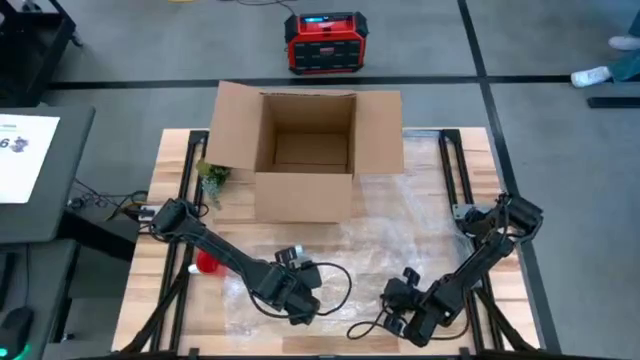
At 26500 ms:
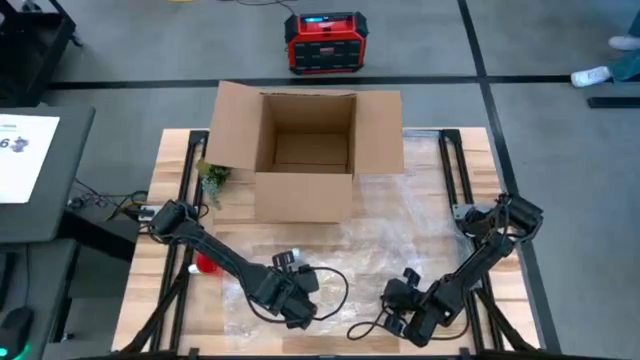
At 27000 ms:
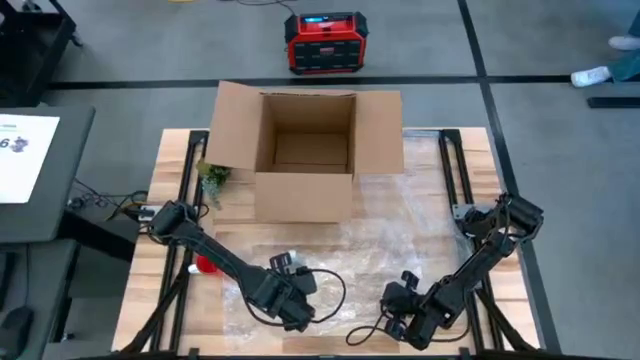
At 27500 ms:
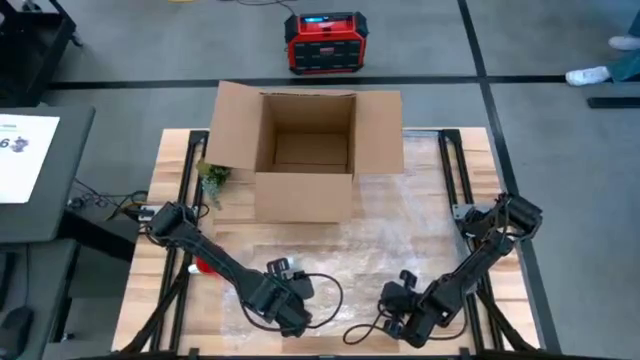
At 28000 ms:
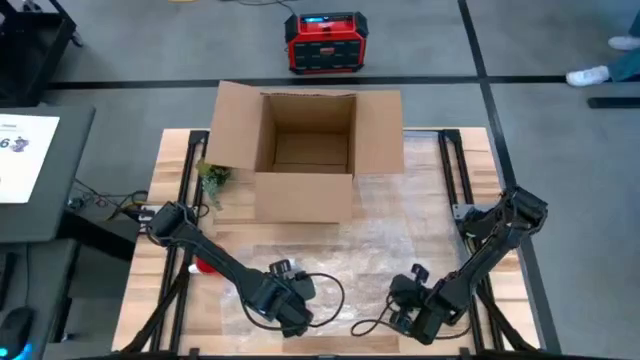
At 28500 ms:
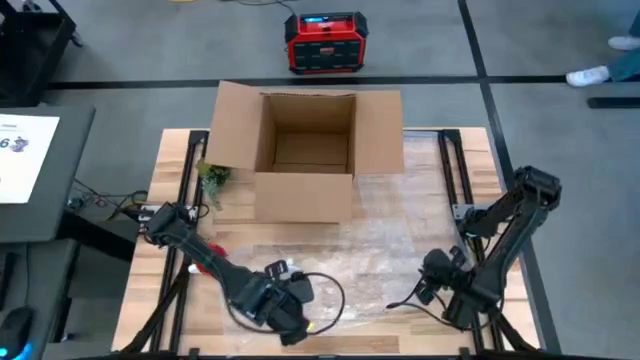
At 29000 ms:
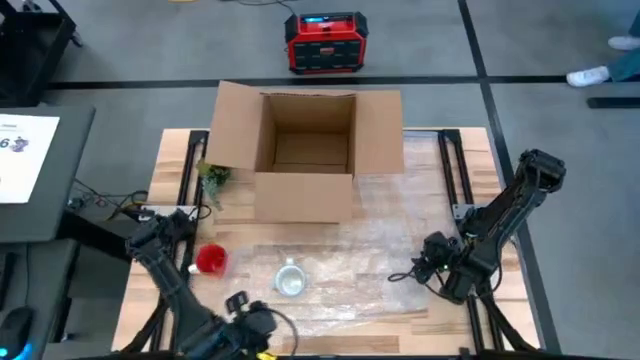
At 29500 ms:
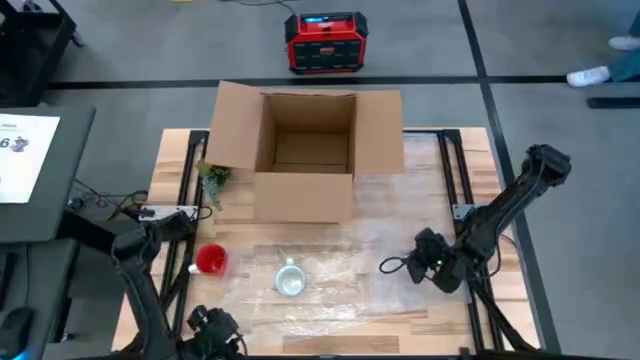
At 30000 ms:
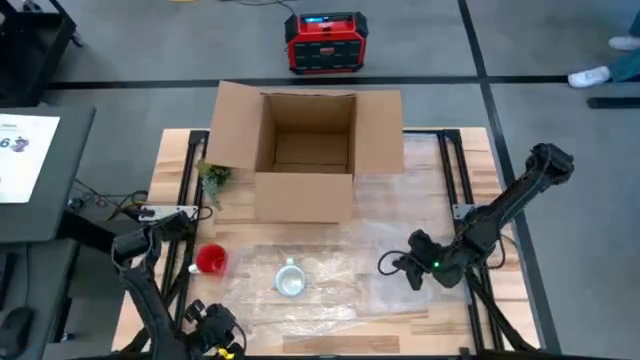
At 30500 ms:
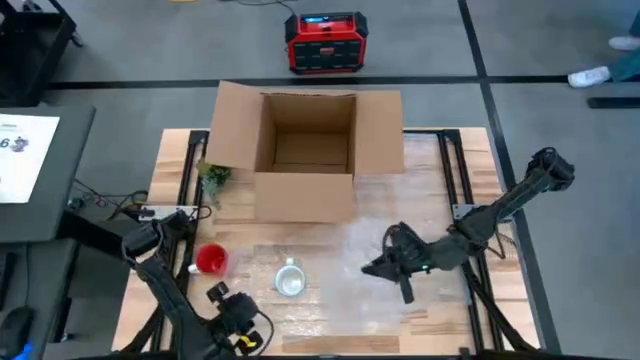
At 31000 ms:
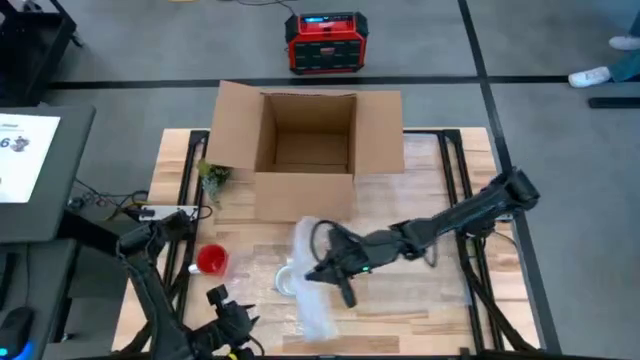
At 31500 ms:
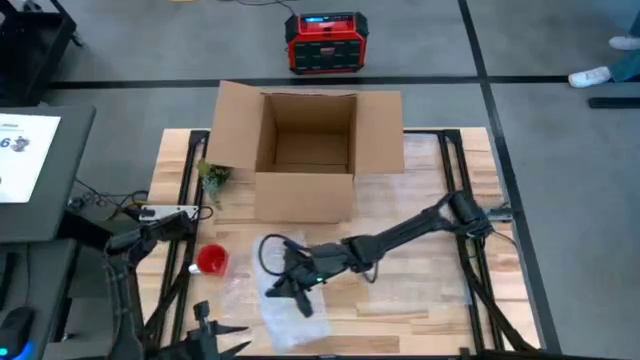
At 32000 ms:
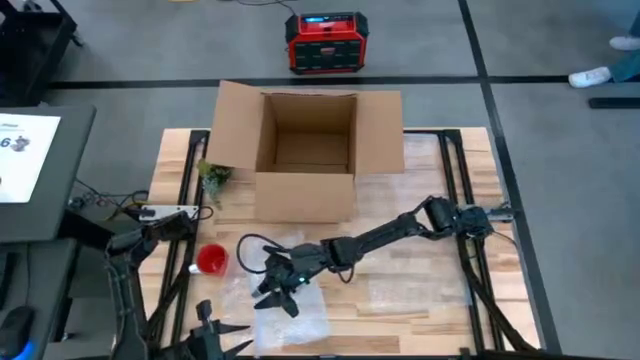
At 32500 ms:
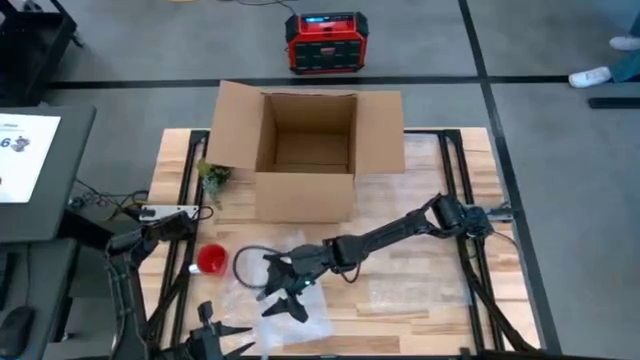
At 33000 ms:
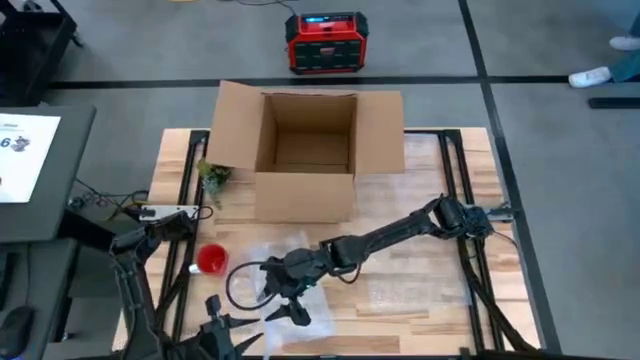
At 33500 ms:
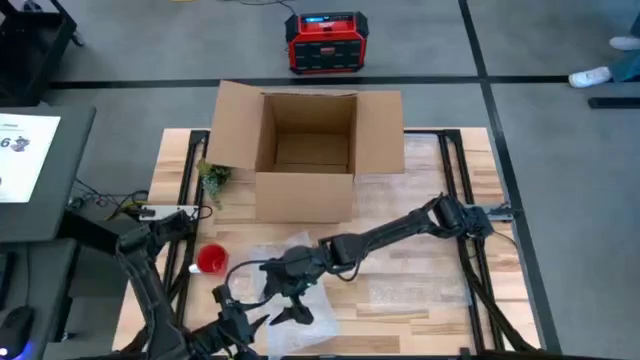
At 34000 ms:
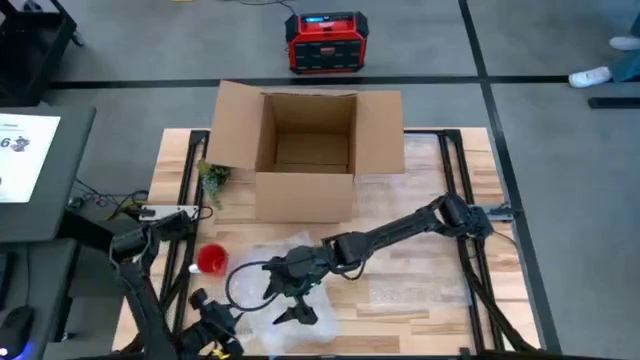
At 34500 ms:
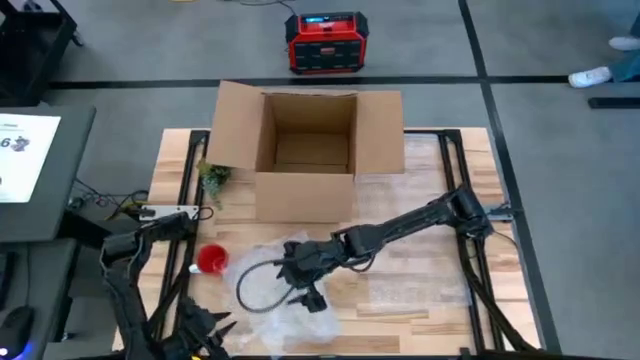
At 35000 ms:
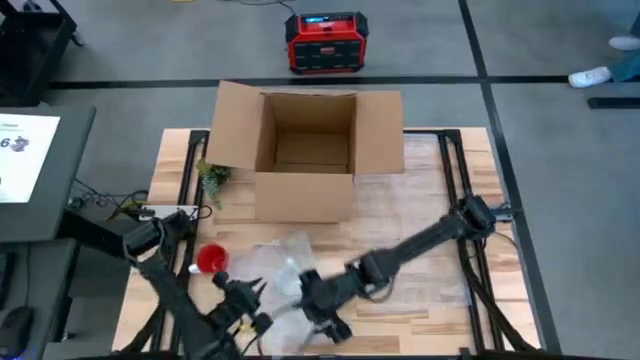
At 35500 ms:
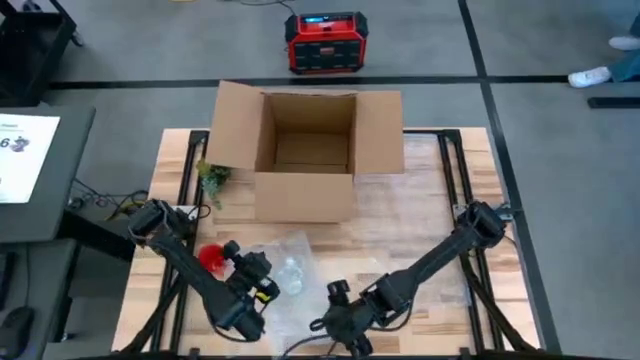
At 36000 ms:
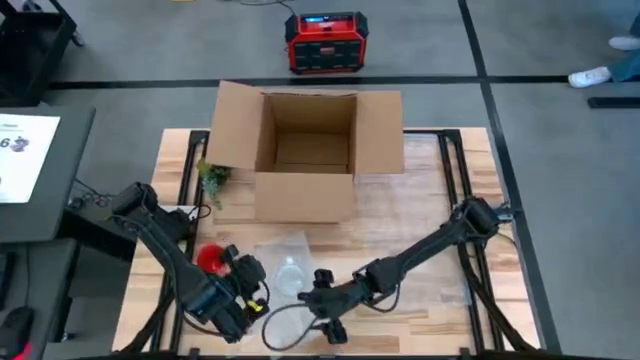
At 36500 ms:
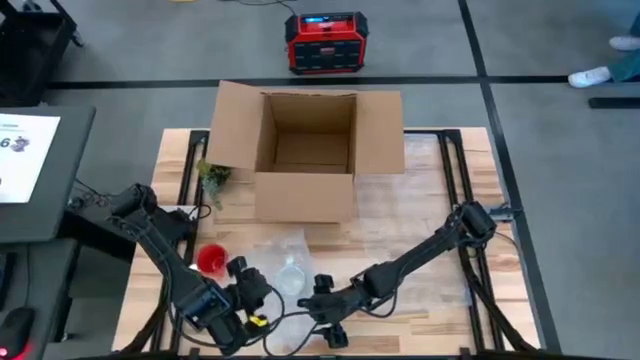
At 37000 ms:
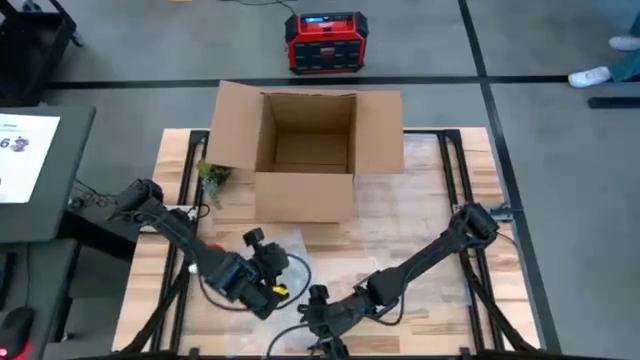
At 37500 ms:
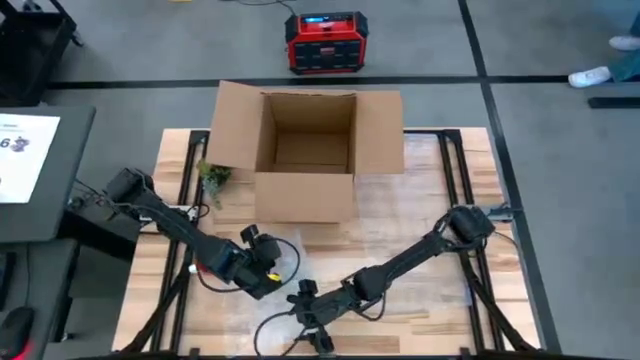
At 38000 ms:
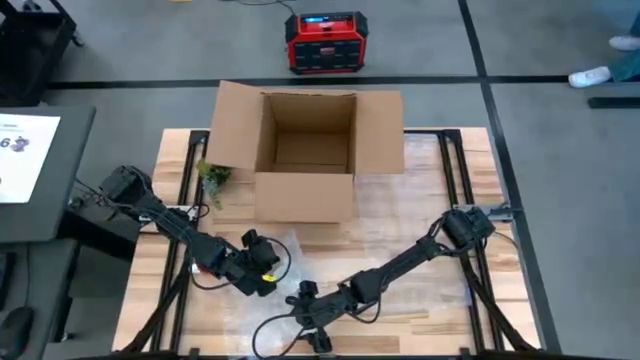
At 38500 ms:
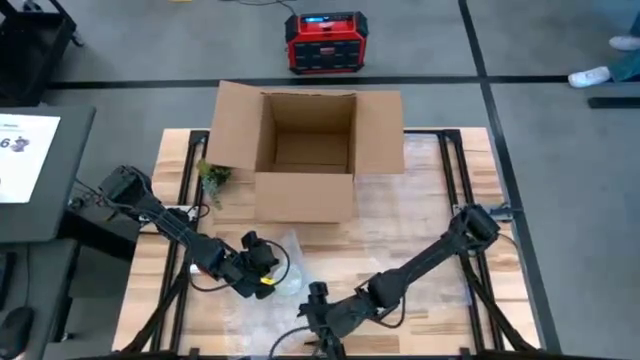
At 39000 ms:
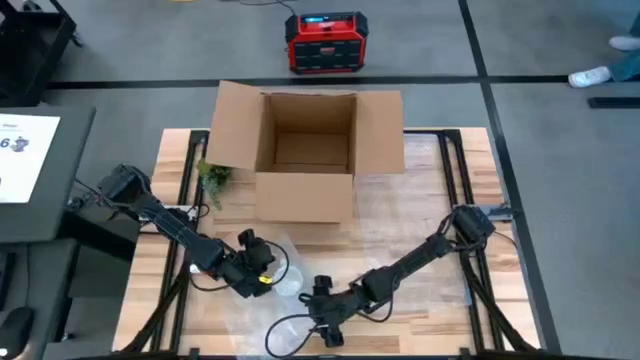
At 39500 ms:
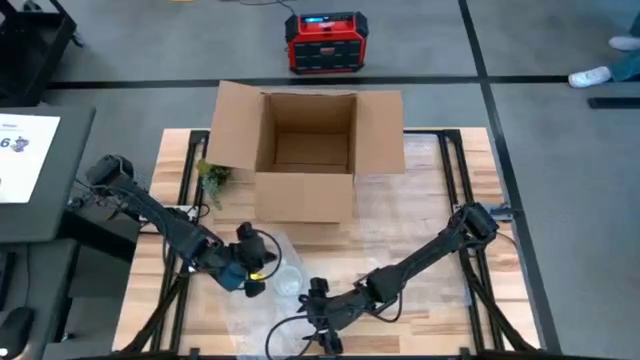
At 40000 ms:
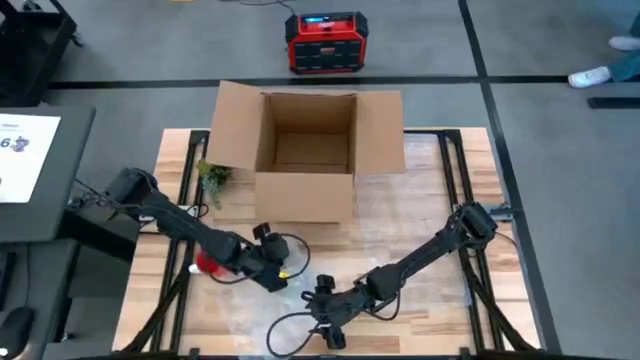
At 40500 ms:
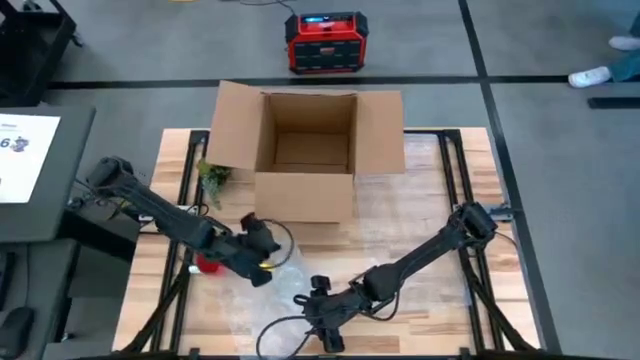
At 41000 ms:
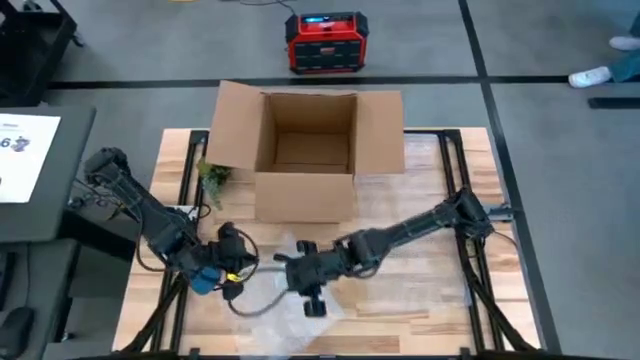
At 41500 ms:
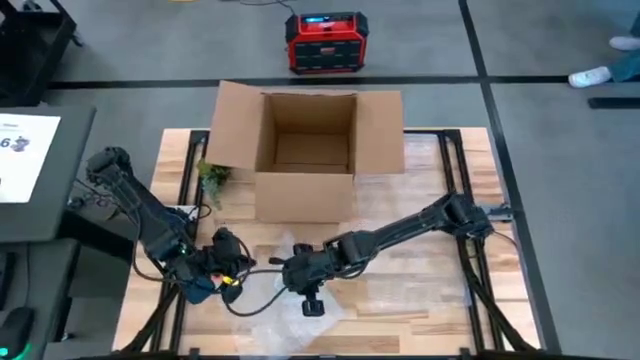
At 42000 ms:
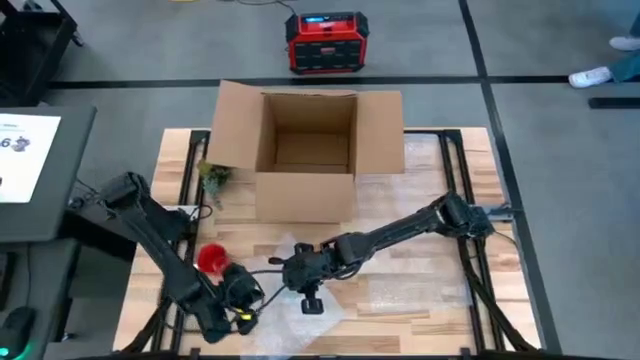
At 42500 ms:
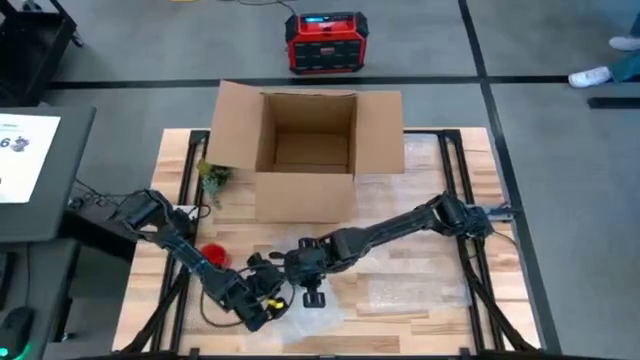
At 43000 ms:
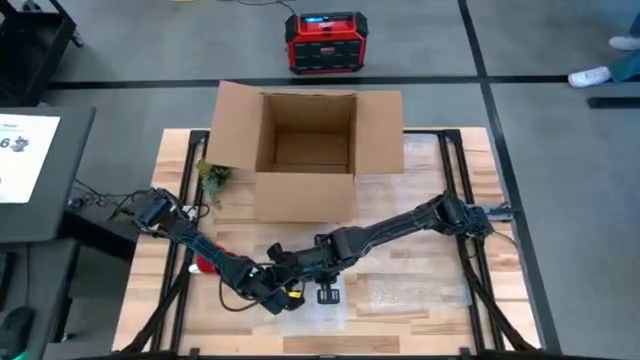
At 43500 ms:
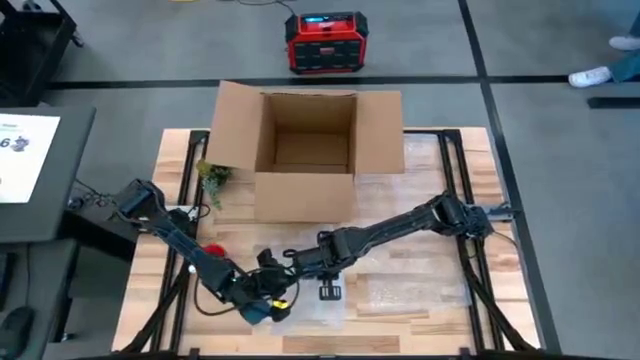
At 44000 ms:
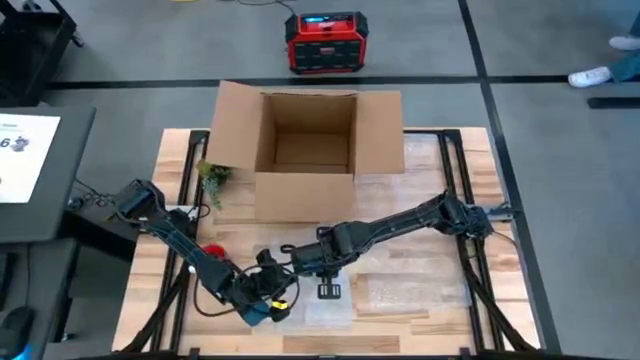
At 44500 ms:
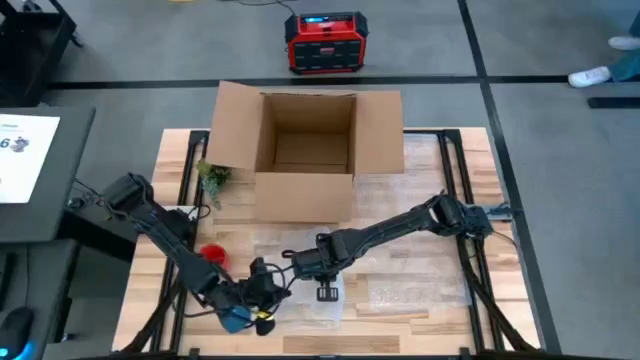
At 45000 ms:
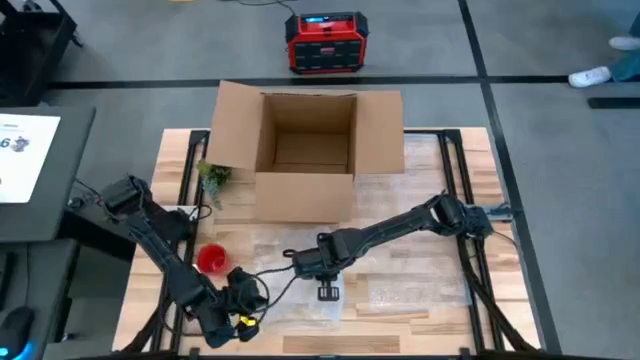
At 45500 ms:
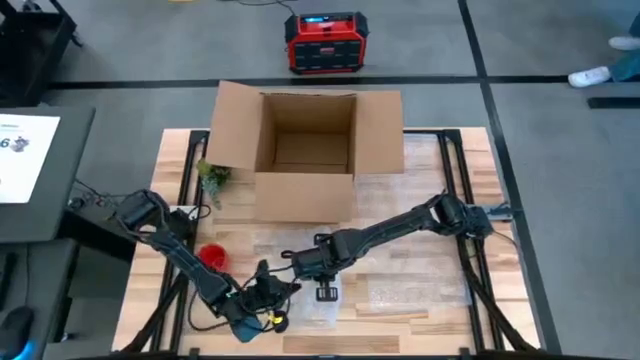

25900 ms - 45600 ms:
Task: wrap mug
Pack the white mug with the bubble wrap

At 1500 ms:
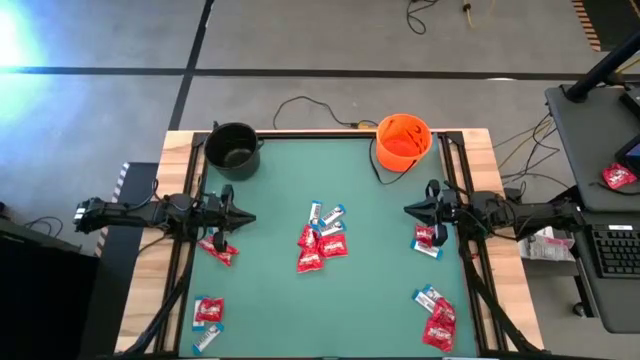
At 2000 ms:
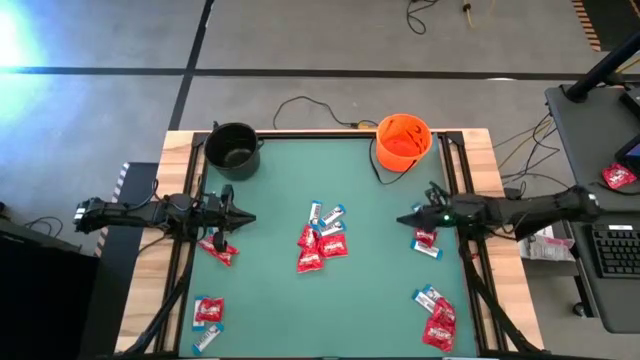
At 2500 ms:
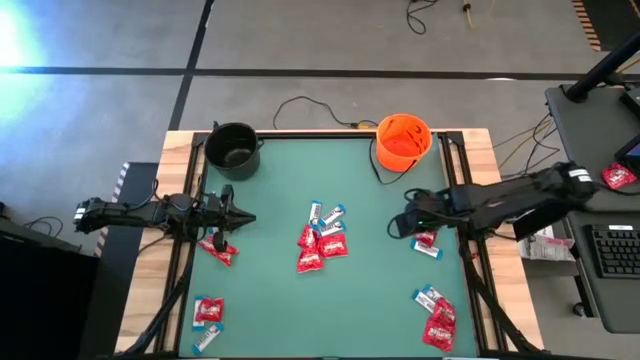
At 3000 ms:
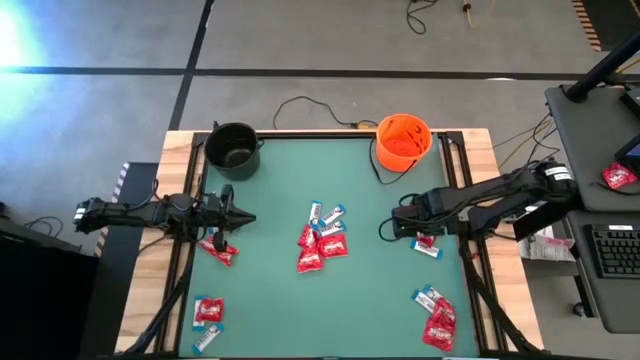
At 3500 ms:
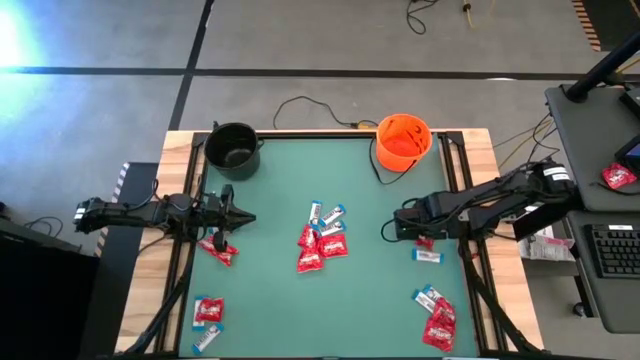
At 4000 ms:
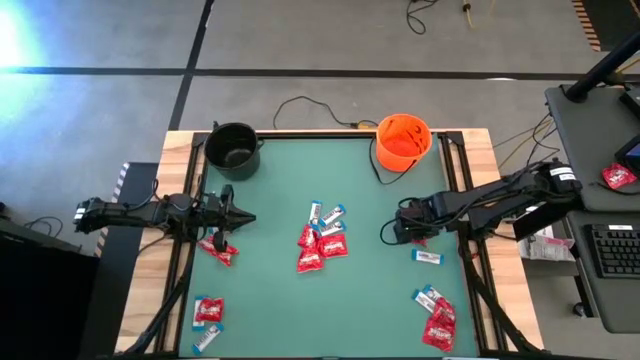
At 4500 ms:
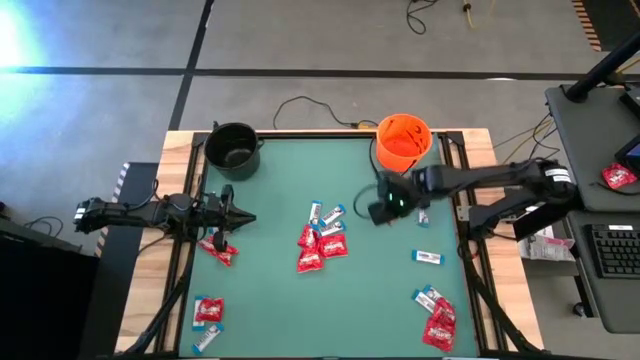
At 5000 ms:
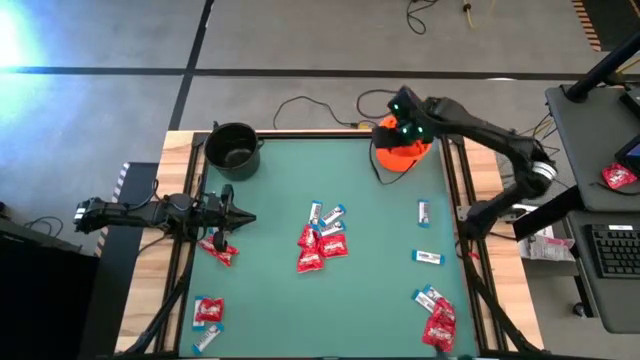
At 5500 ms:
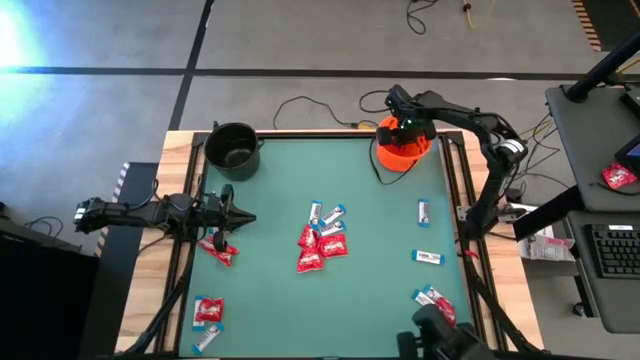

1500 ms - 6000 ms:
Task: Sort candy by brand, put in halloween buckets
Put the red candy into the orange bucket
